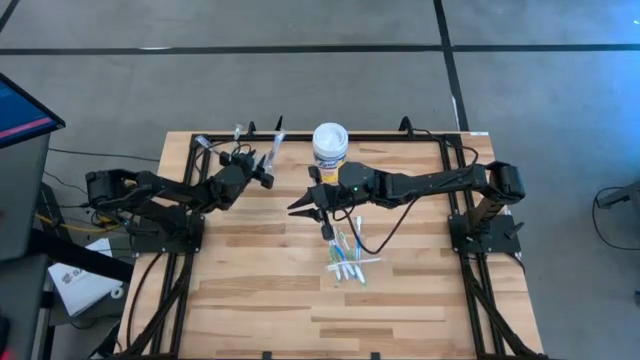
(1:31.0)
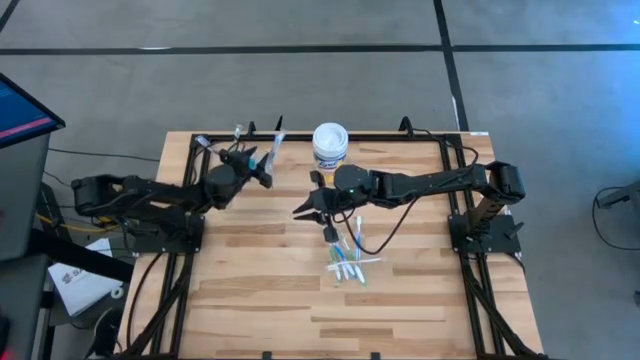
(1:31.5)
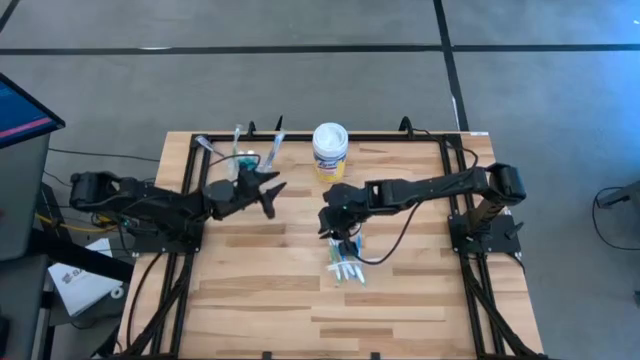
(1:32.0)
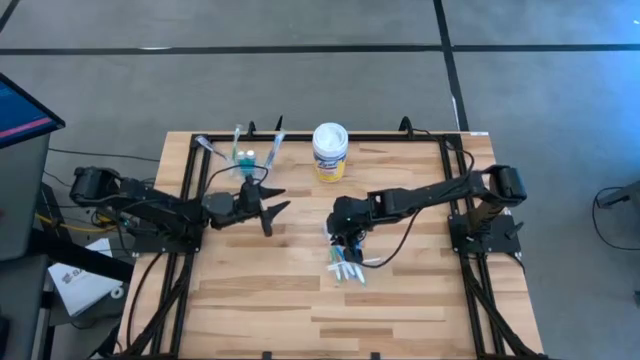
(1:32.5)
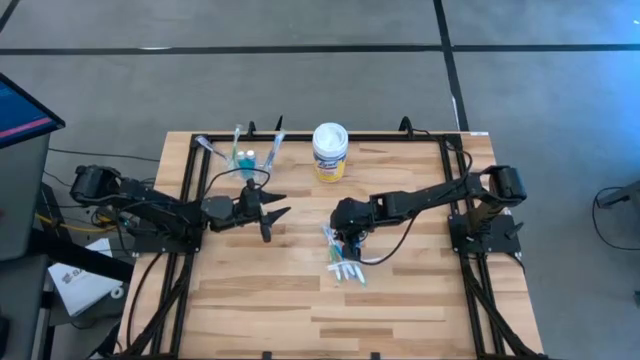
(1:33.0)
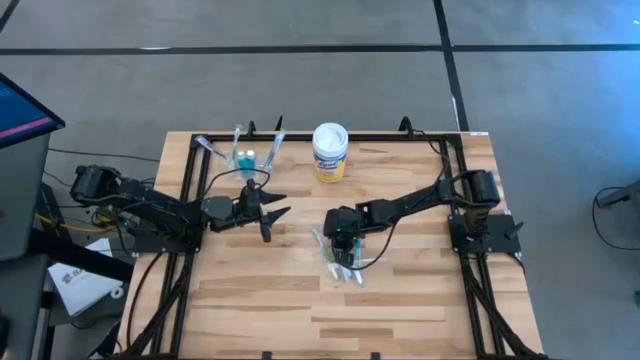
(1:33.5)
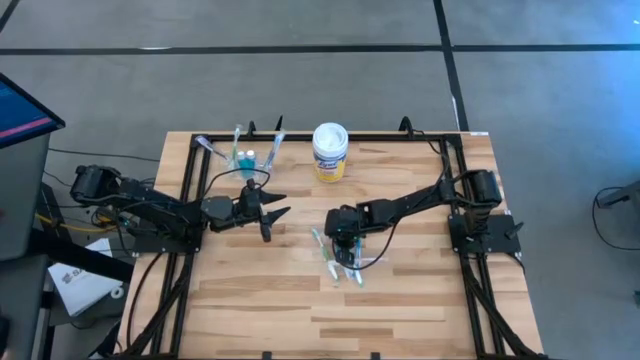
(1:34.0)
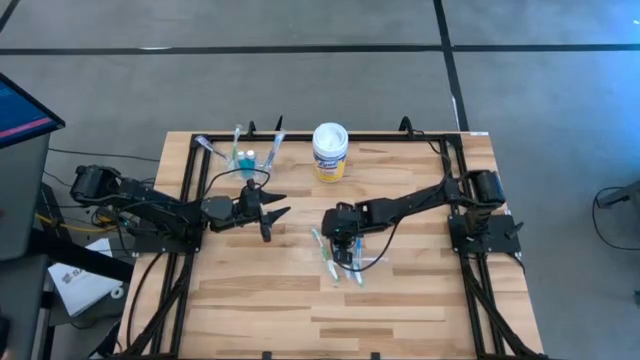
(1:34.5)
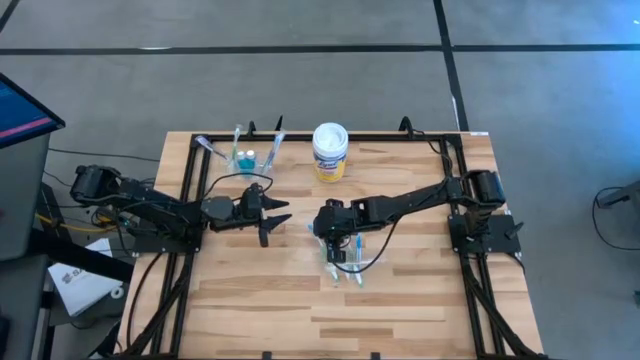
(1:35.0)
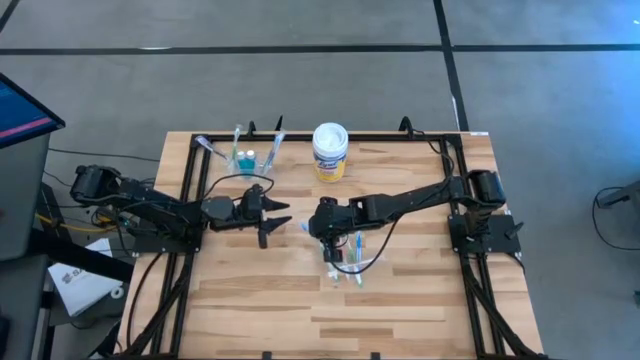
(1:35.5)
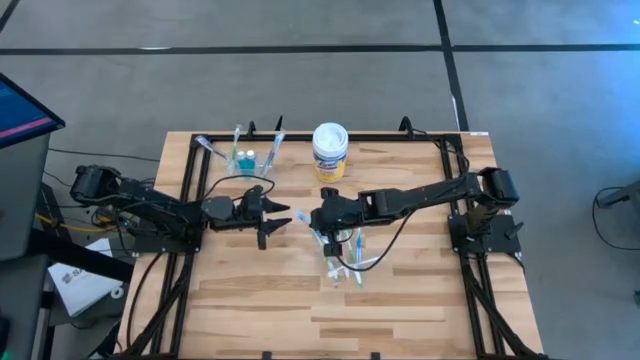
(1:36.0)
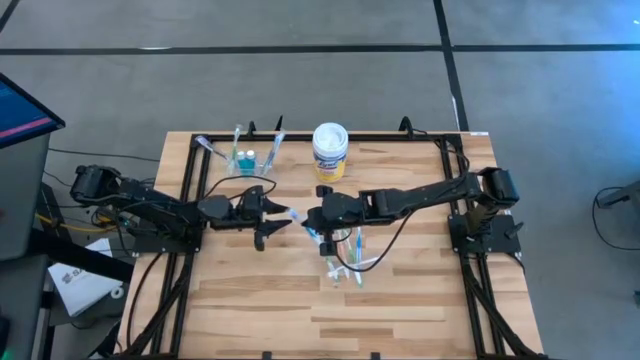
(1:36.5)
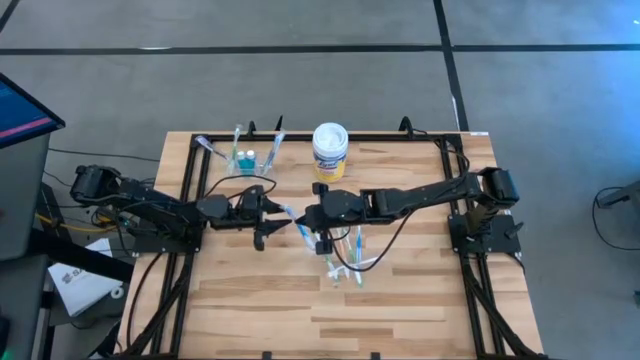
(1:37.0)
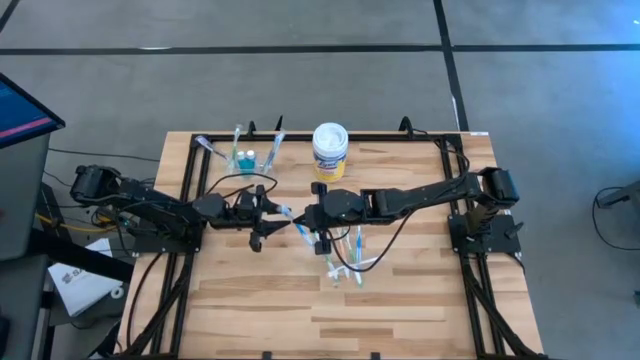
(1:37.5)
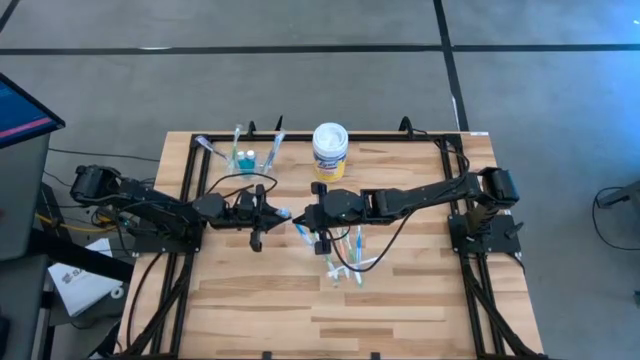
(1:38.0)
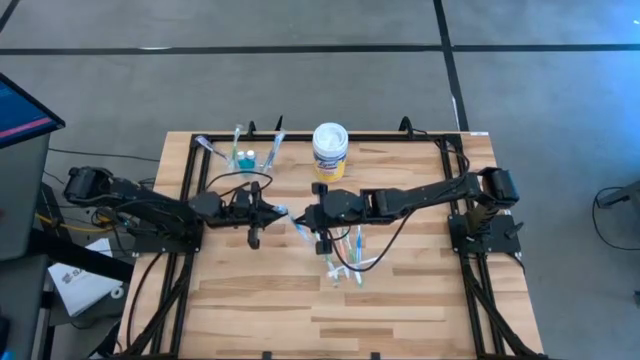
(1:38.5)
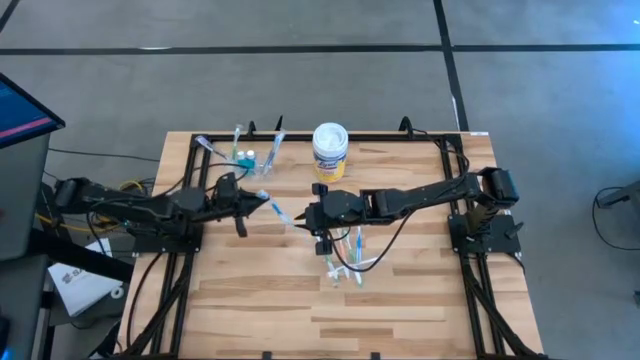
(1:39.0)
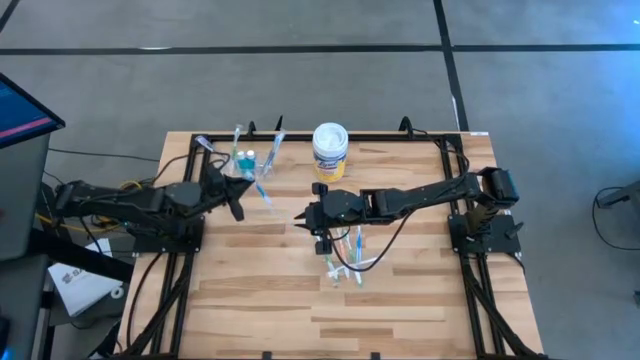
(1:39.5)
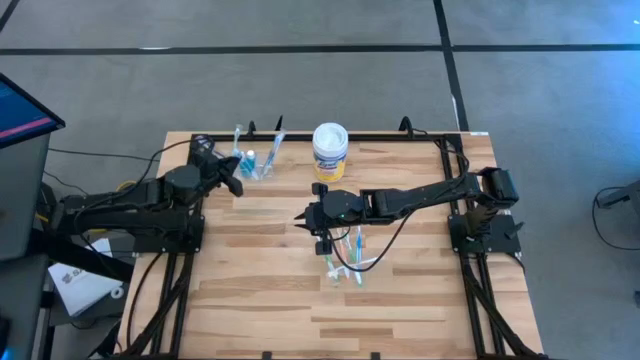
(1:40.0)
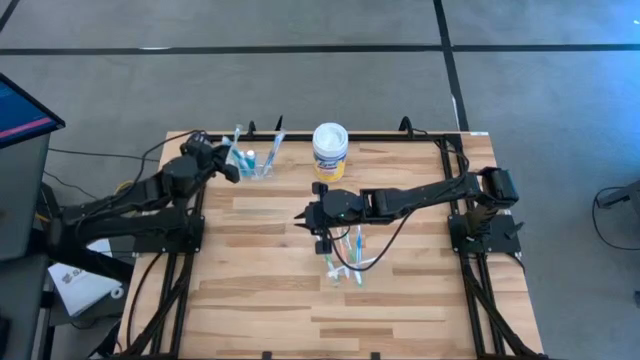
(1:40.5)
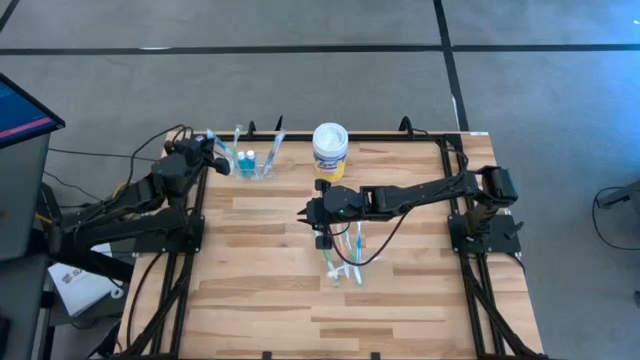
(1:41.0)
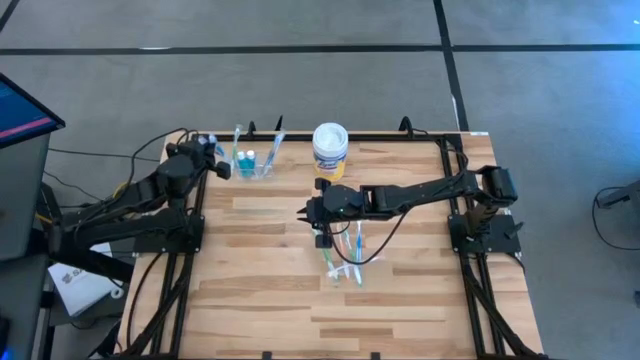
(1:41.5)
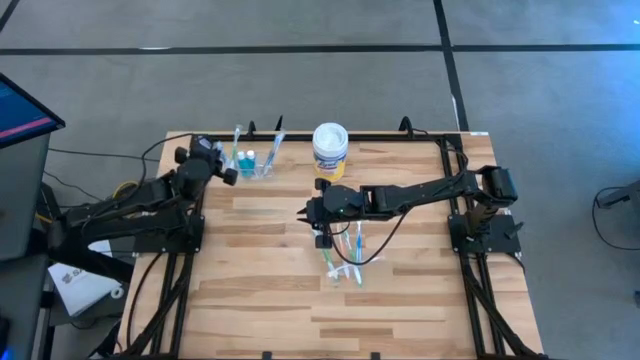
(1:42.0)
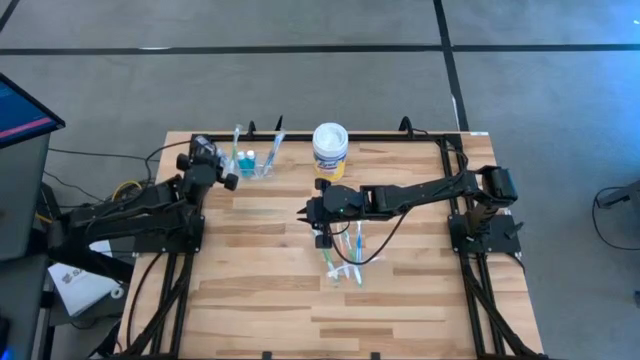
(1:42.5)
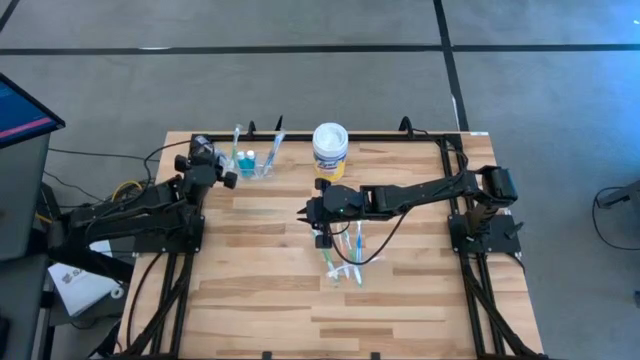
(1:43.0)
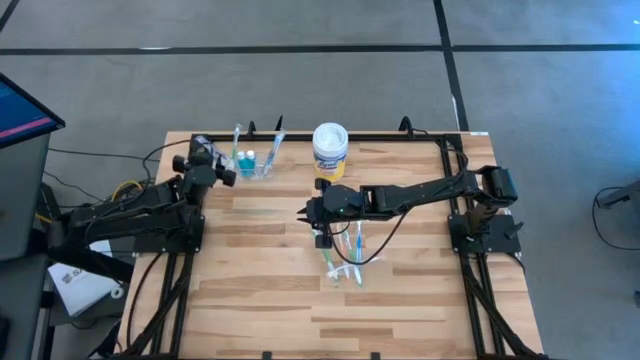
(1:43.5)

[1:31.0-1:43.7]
Task: Pick & Place toothbrushing station
Put the blue toothbrush into the transparent organizer

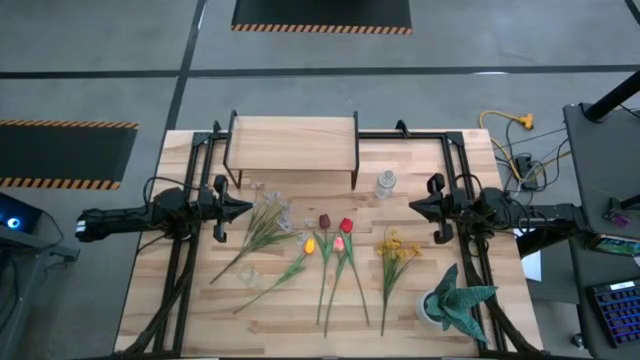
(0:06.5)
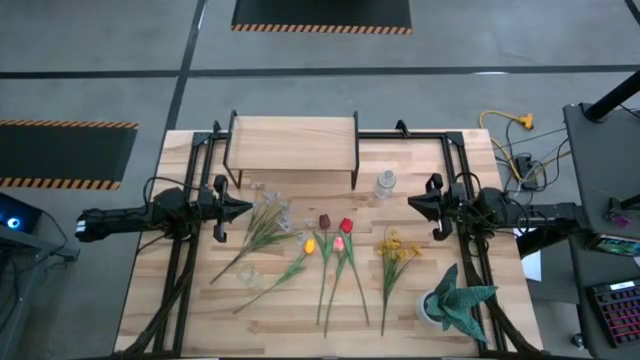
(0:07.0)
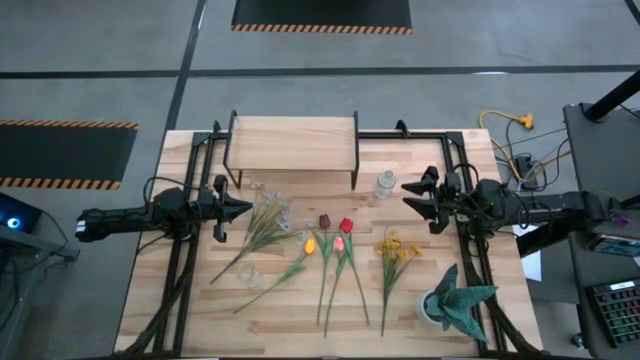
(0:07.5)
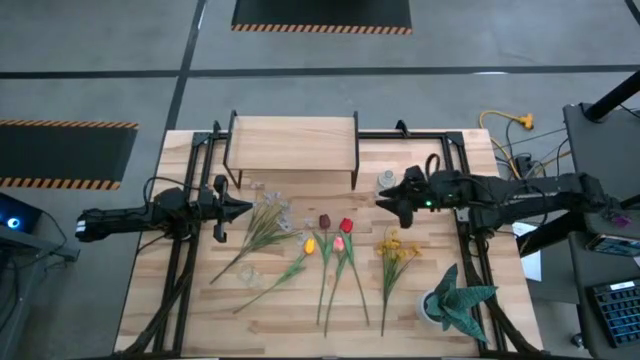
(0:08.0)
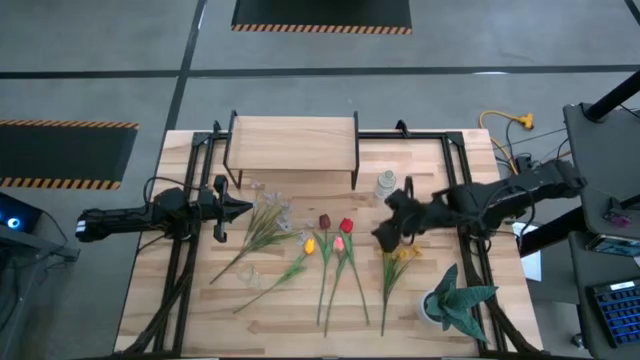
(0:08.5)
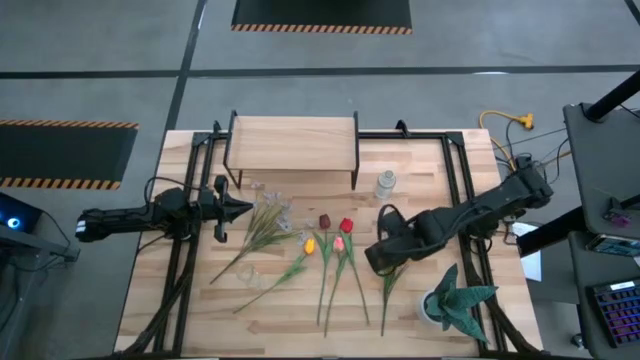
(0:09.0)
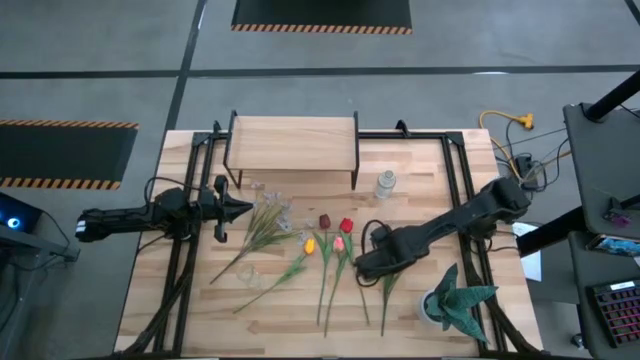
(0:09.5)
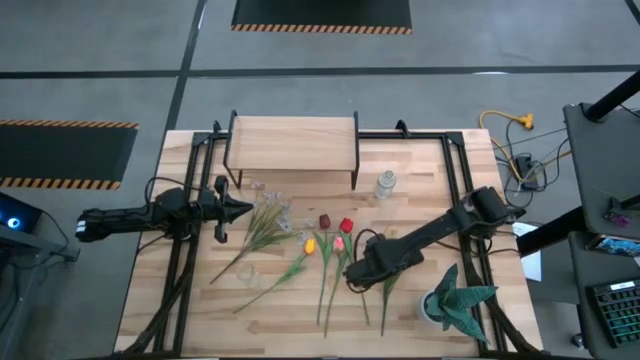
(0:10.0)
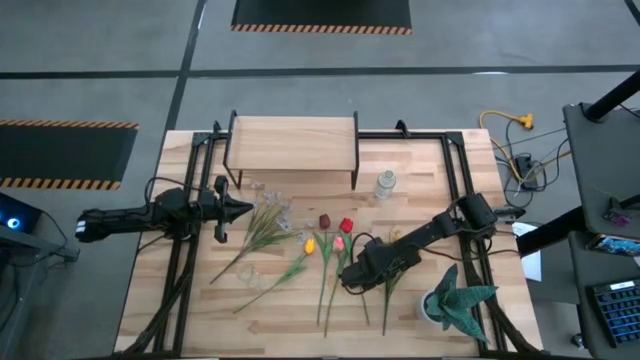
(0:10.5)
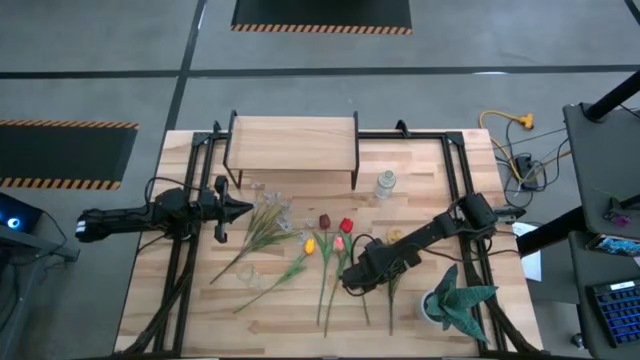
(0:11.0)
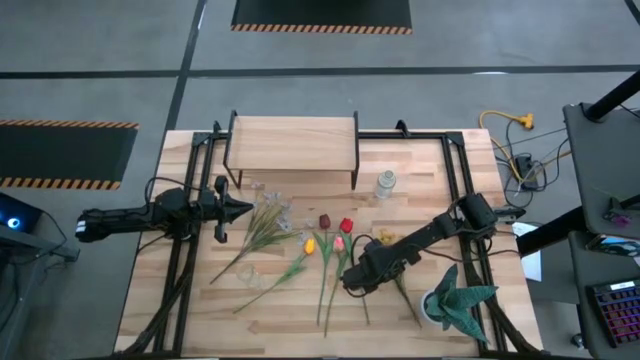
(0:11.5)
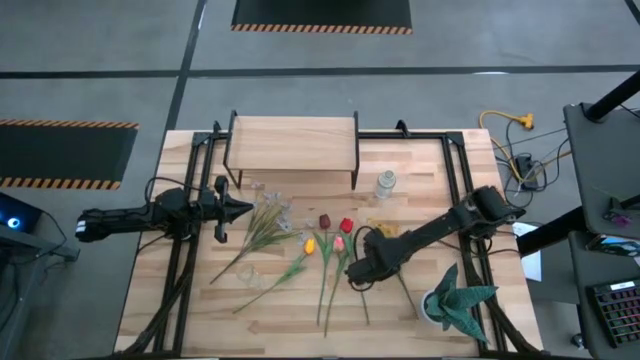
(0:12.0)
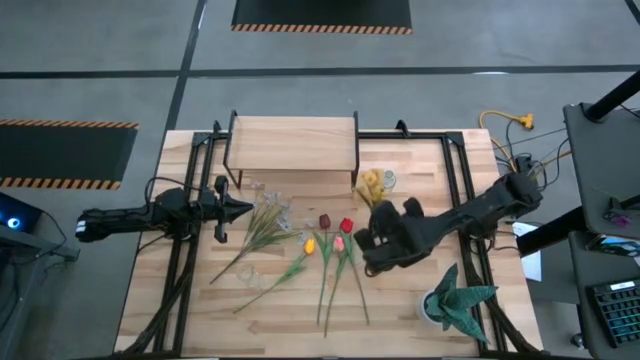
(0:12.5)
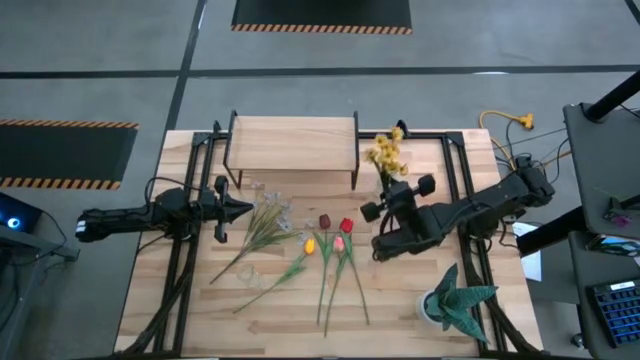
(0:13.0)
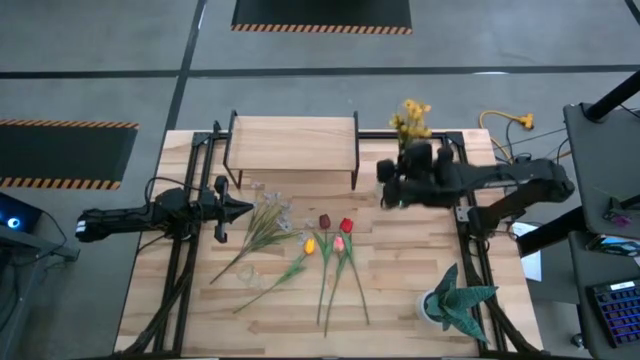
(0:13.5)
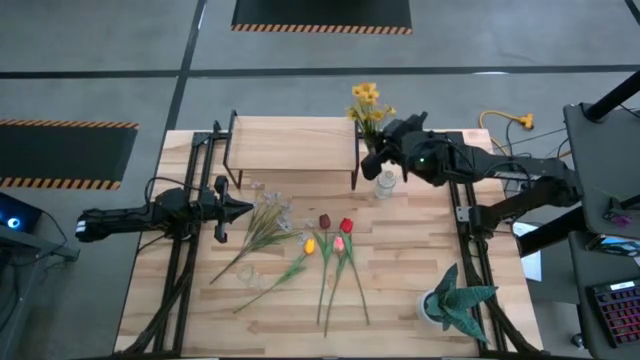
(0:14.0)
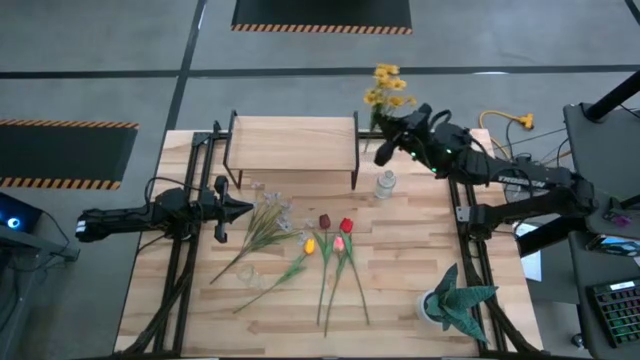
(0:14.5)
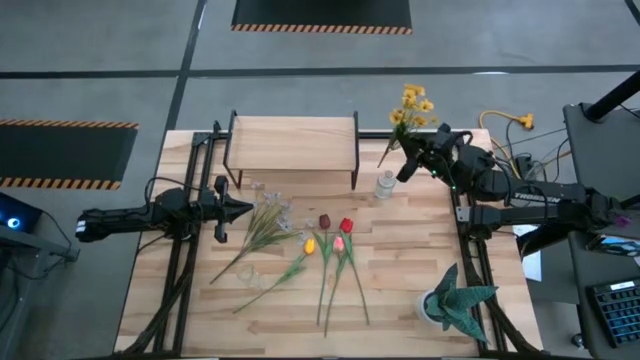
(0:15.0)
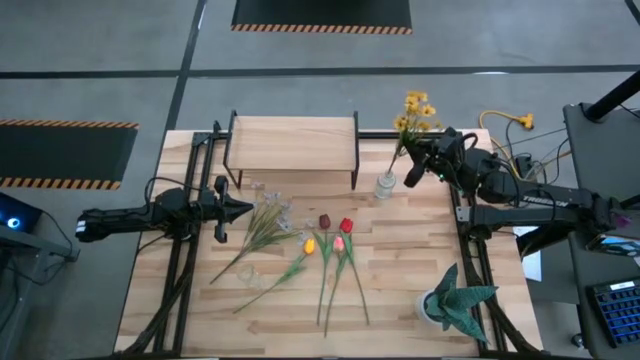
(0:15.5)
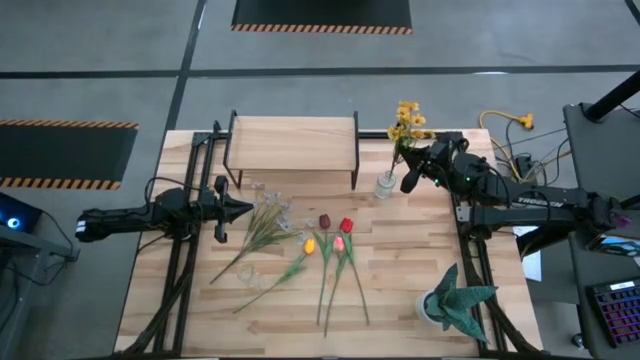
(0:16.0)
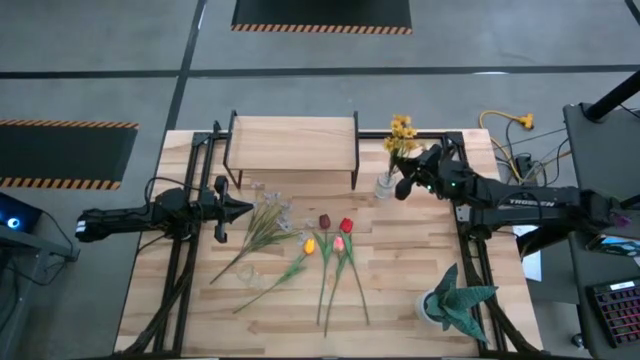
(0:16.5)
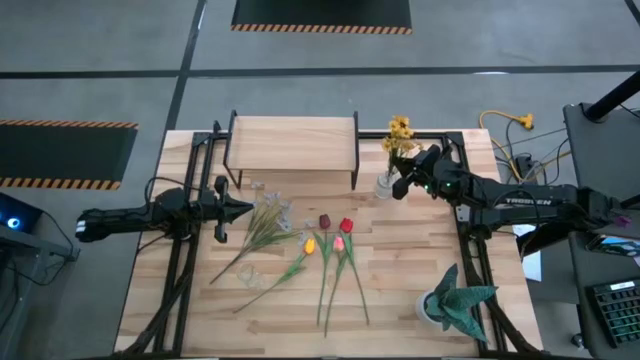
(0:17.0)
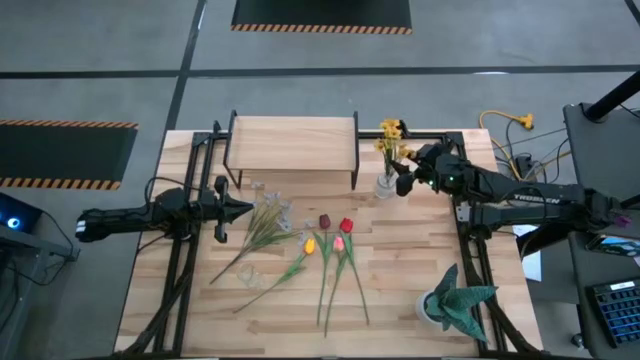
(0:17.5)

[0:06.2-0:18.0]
Task: Pick and place flowers into a vace then onto a shelf
Put the yellow flowers into the right transparent vase
